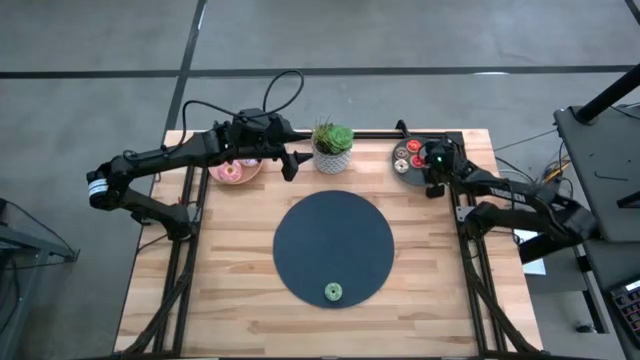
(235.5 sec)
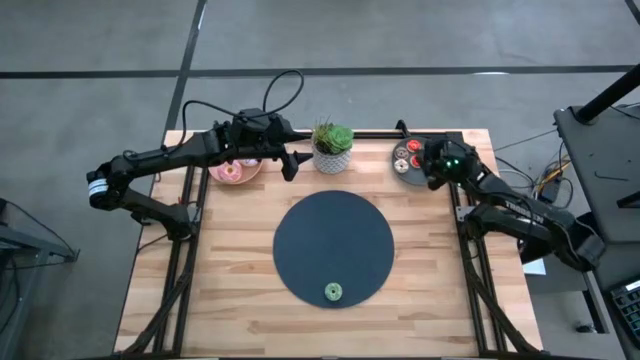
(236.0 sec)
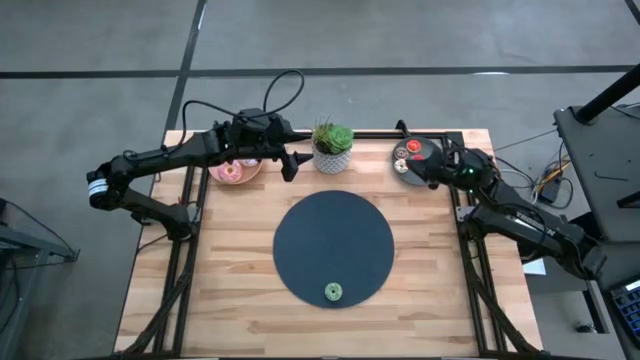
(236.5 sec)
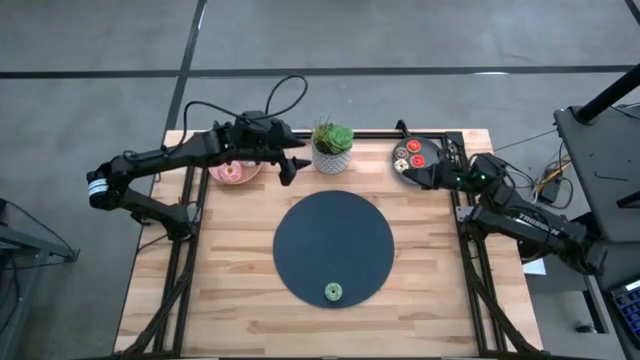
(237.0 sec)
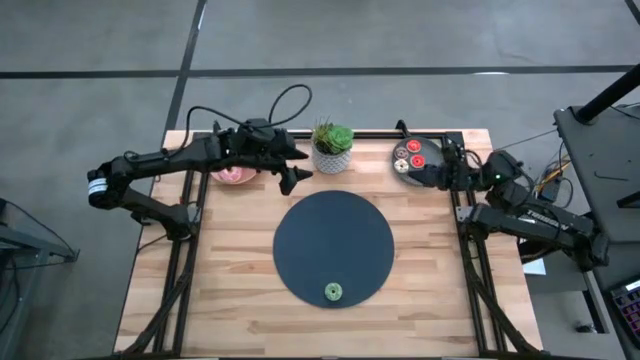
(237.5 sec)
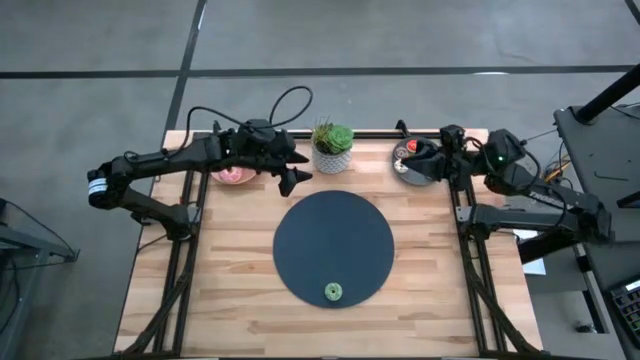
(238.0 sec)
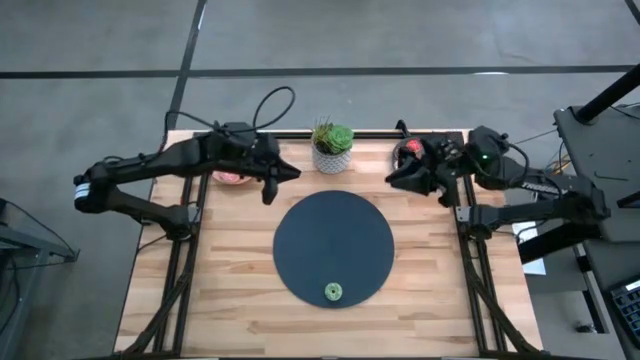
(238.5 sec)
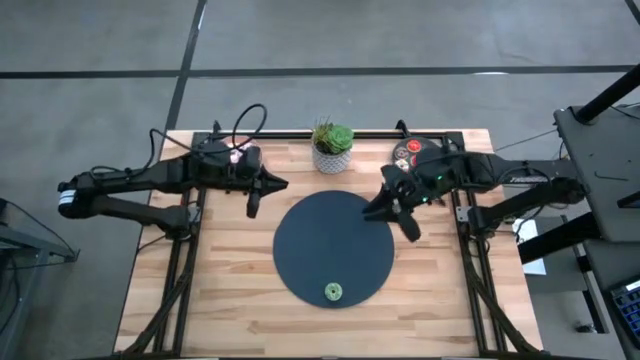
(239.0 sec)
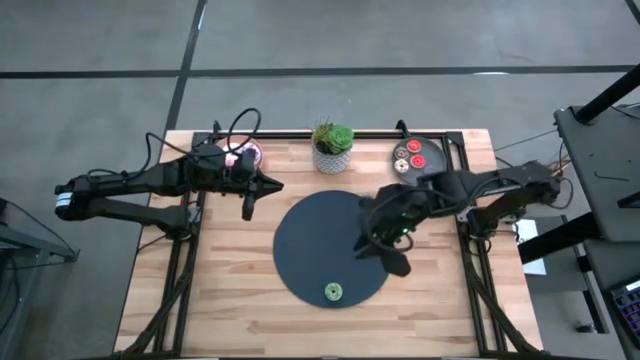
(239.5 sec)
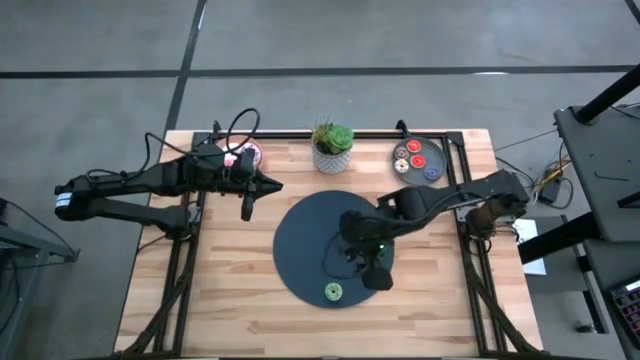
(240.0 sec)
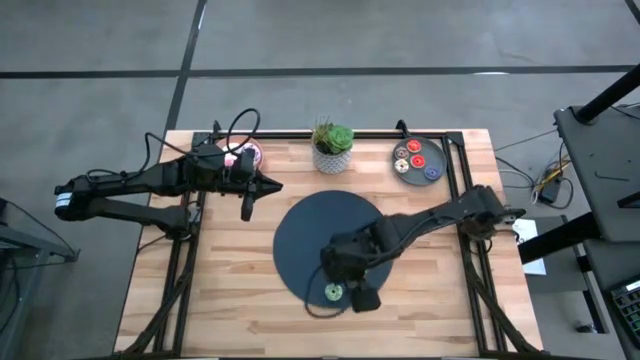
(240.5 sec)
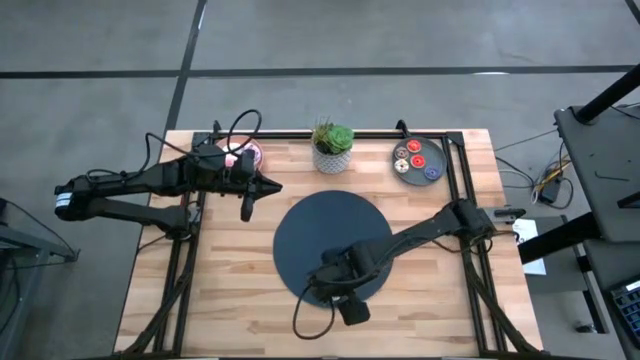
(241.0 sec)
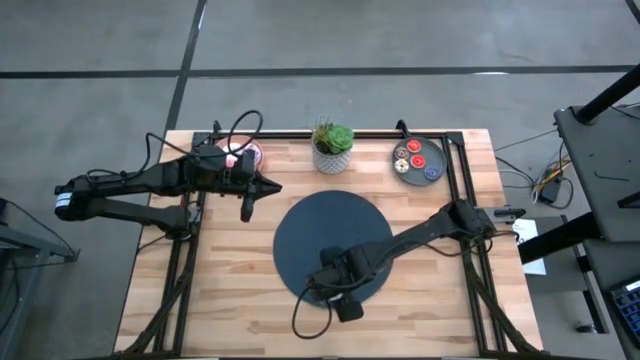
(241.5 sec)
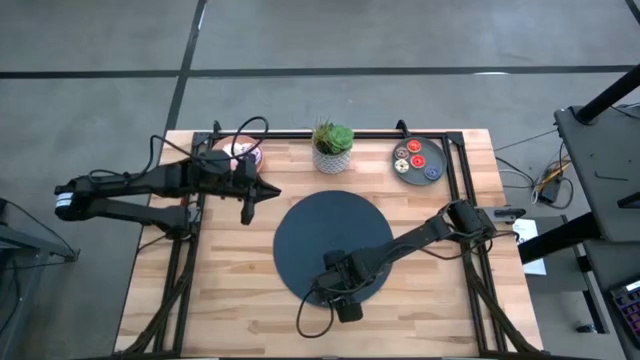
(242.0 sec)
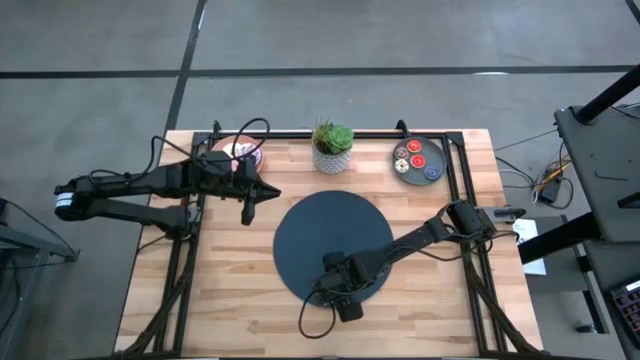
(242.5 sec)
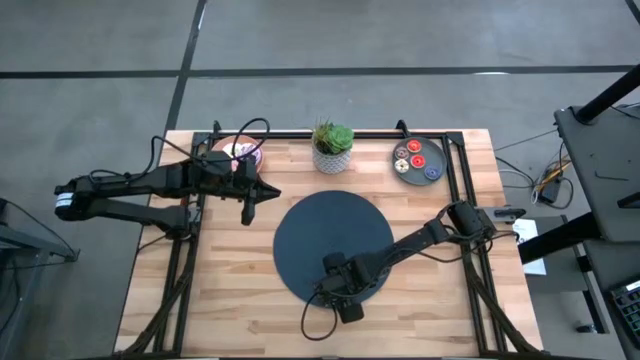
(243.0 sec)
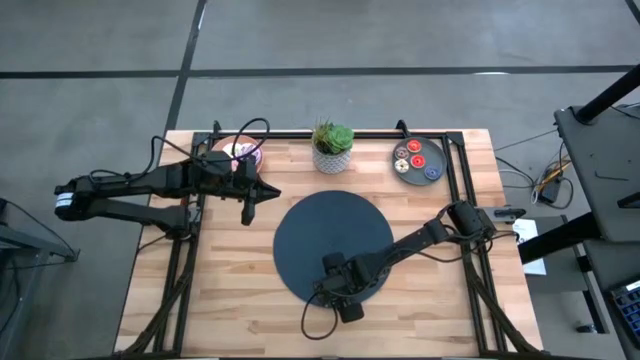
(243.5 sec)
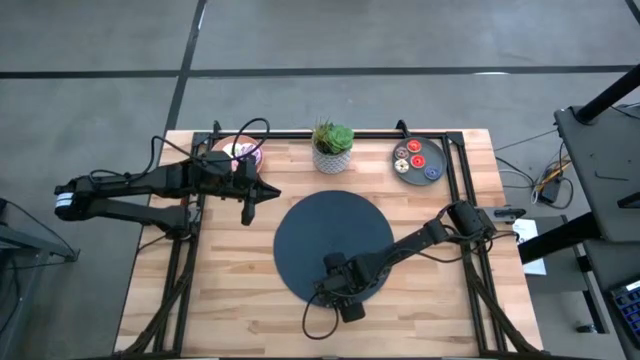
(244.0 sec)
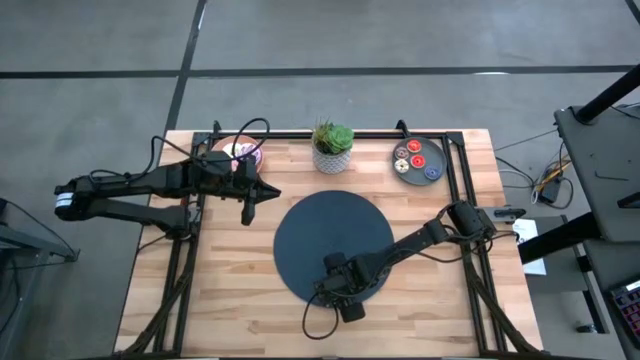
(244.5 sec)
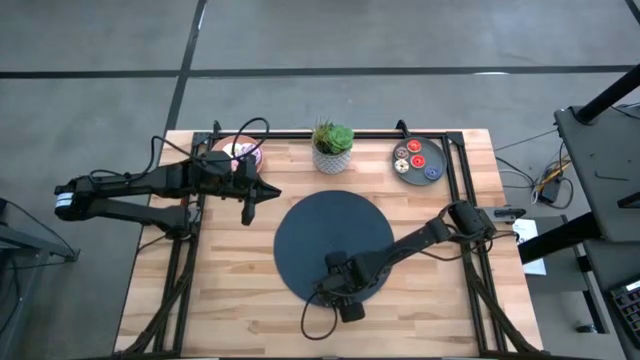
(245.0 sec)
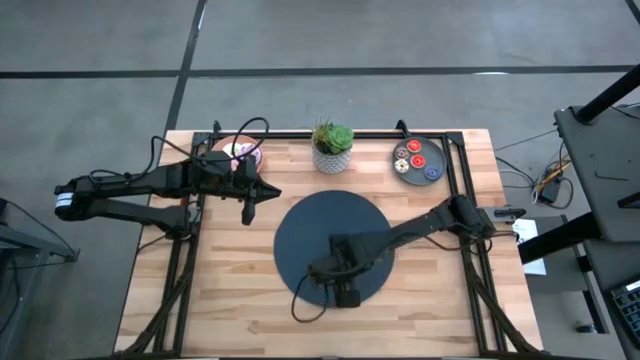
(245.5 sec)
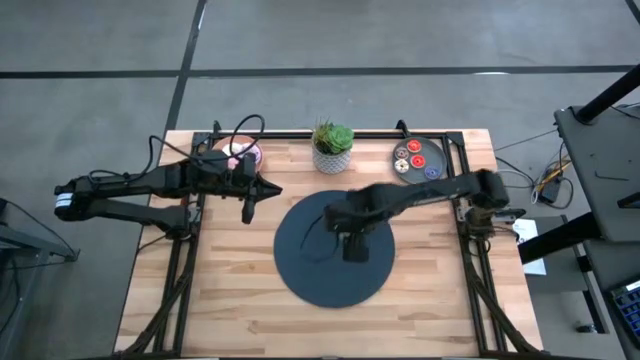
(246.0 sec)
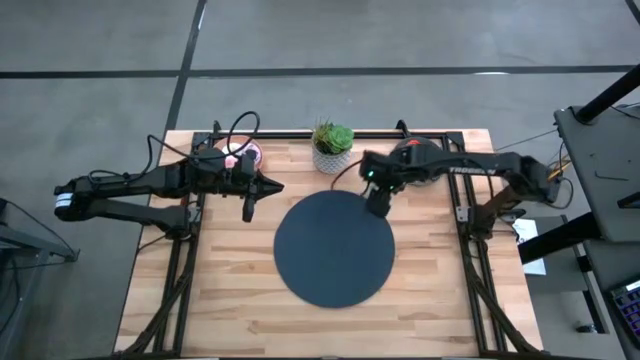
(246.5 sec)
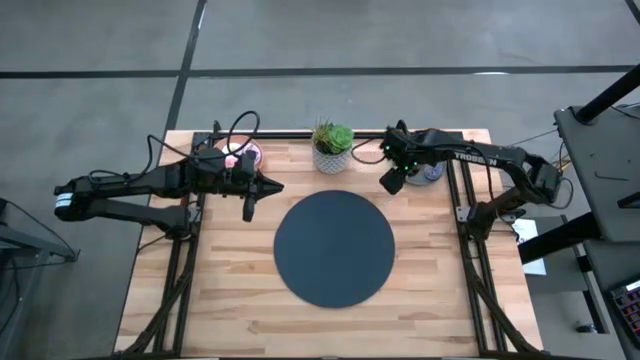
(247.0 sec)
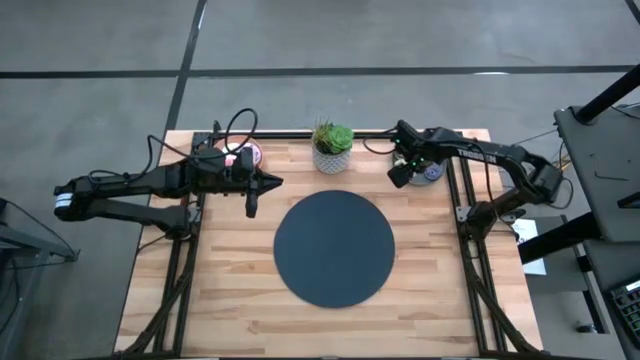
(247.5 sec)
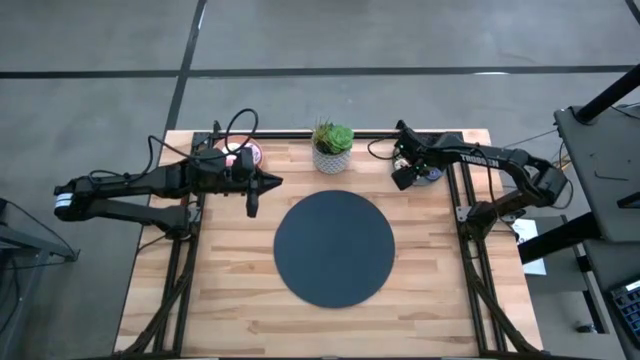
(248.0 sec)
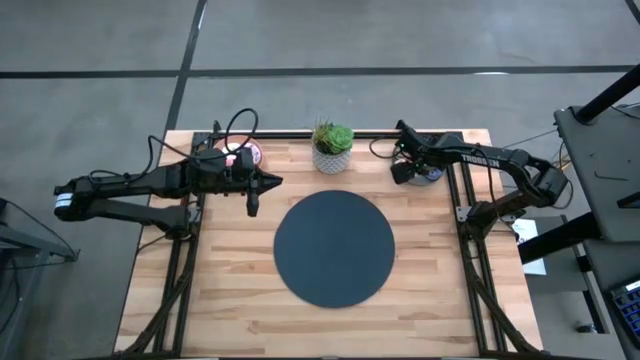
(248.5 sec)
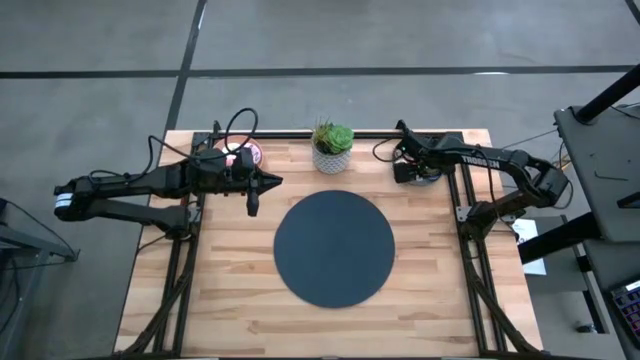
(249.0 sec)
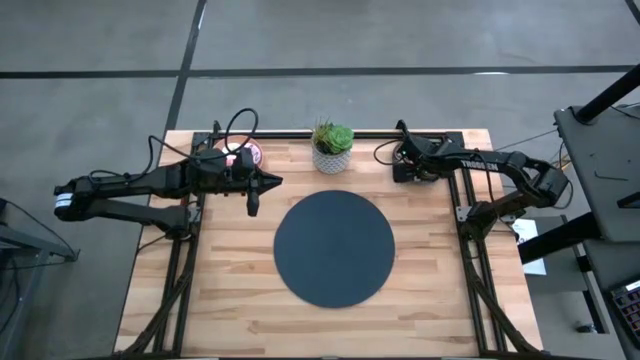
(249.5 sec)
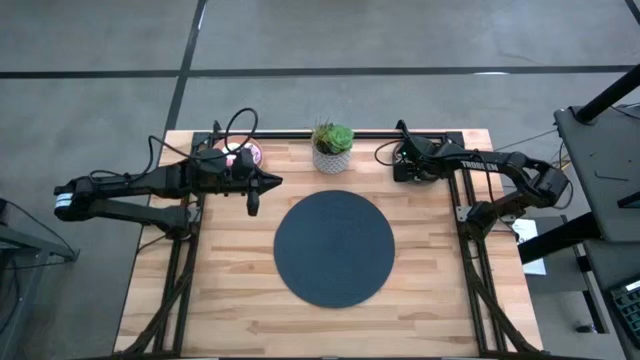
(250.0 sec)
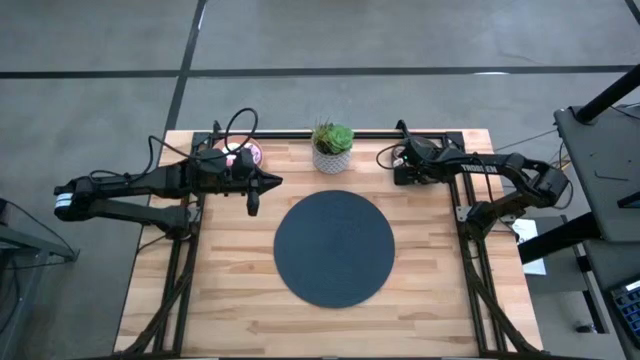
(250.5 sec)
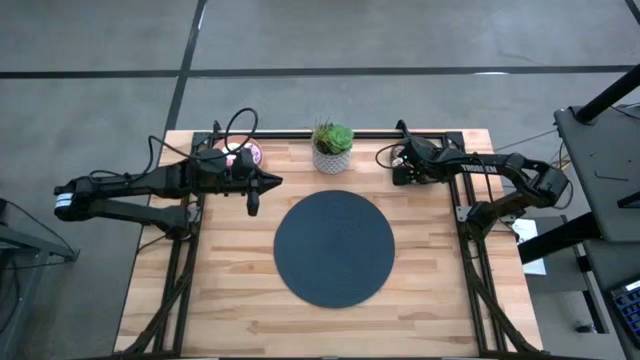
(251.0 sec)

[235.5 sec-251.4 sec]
Task: Pick & Place donuts
Put the small green donut on the gray plate

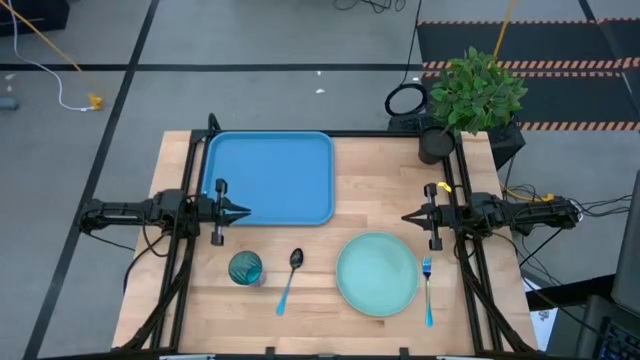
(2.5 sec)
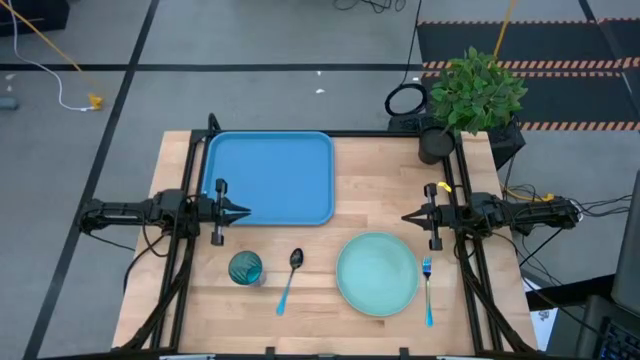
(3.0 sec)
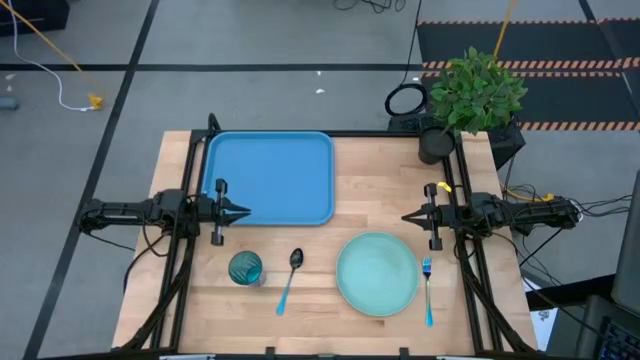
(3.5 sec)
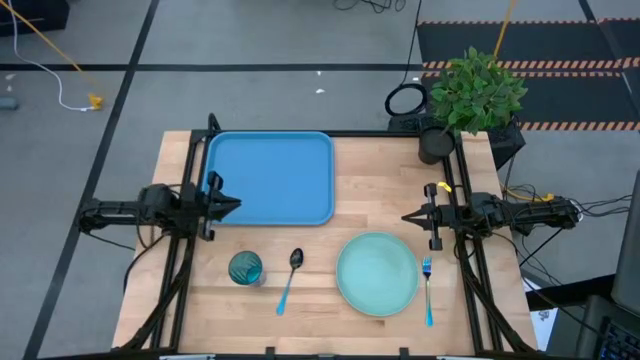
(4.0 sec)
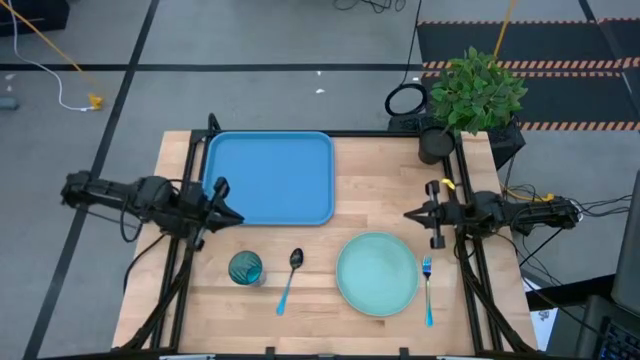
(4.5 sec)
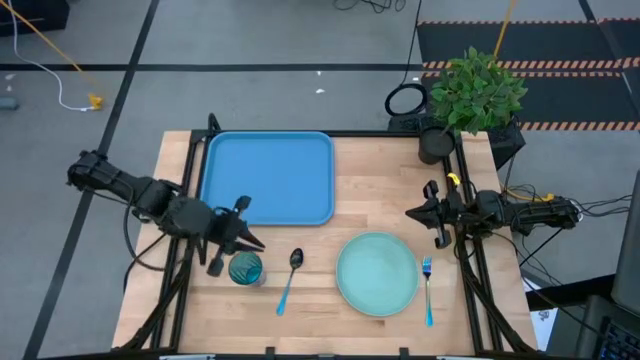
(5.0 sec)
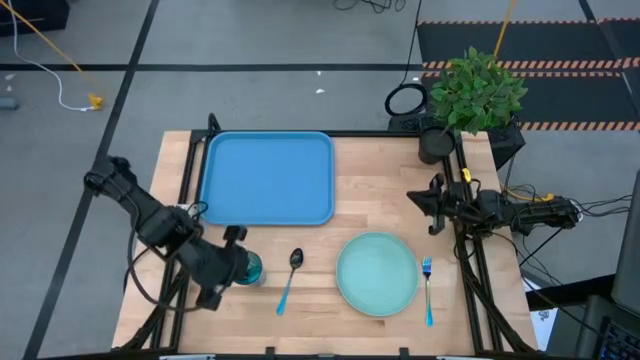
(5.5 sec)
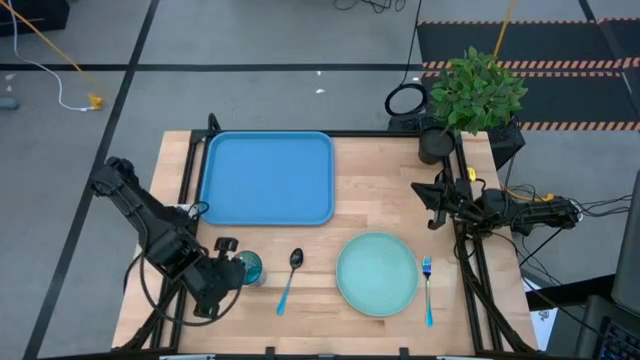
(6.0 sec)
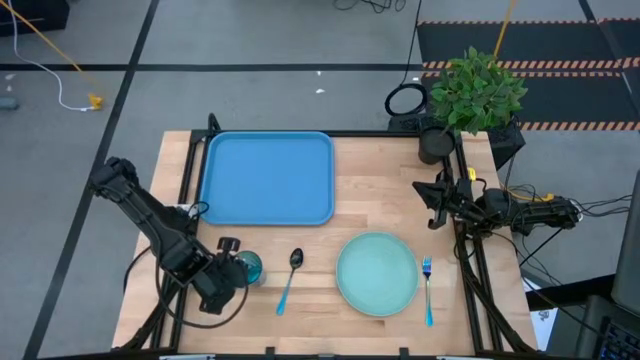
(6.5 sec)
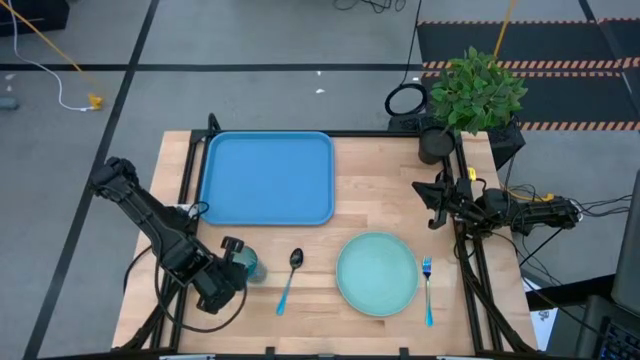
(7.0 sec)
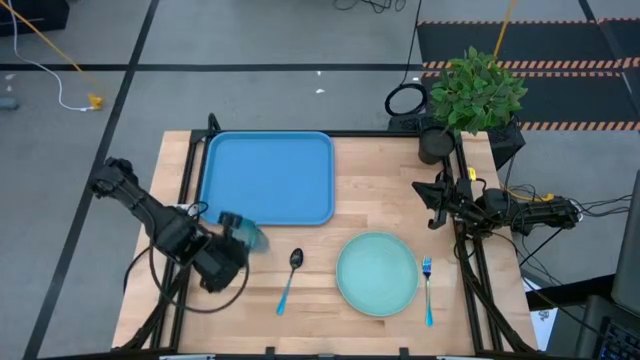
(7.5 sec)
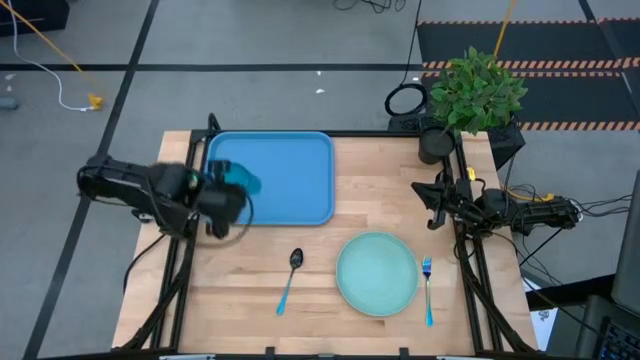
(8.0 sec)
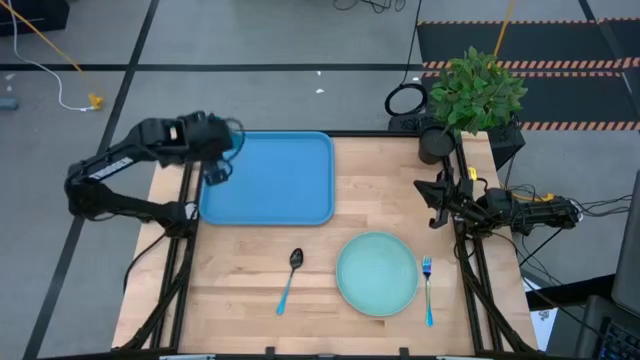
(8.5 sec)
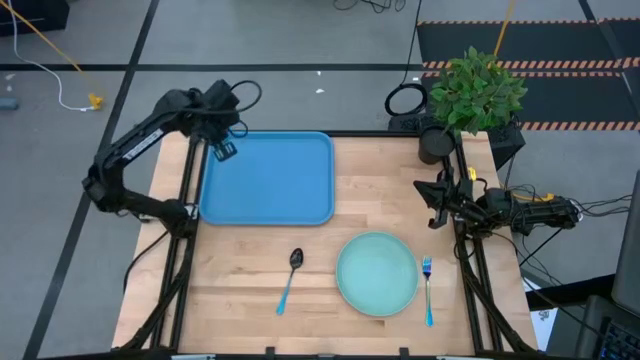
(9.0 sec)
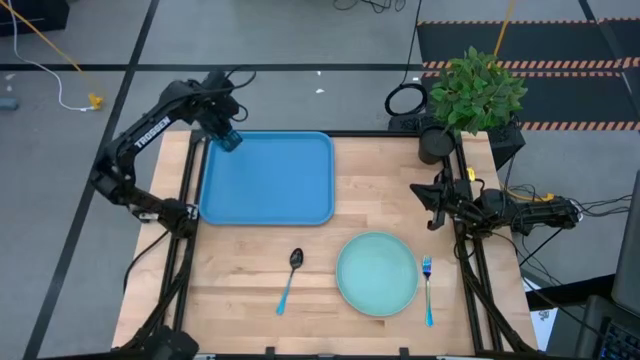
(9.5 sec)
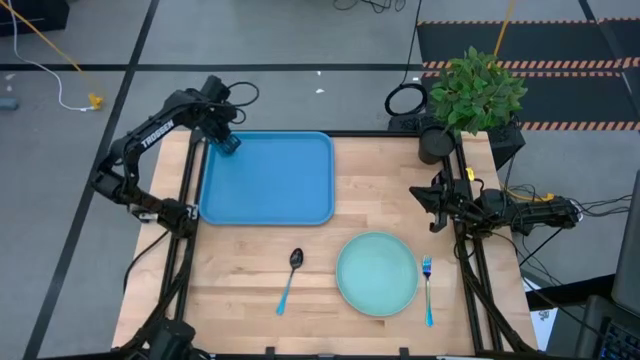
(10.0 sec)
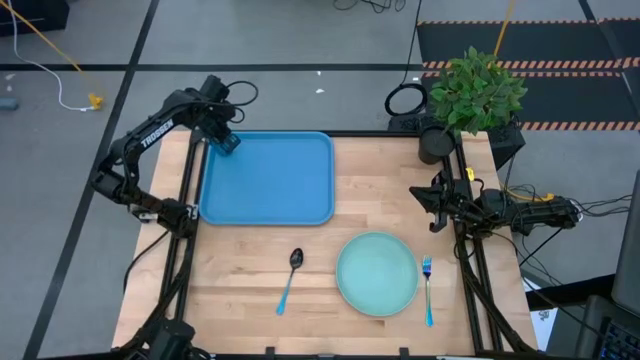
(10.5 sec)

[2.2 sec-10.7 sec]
Task: Pick and place plate/cup/fork/spoon on tray
Put the blue cup on the blue tray
